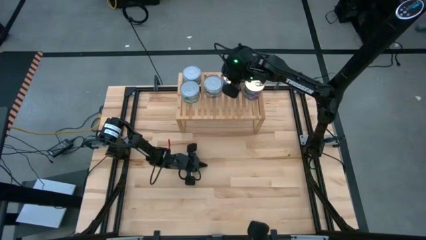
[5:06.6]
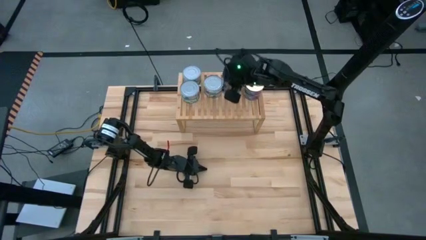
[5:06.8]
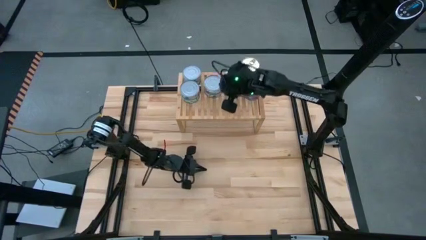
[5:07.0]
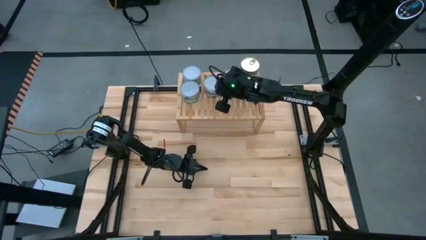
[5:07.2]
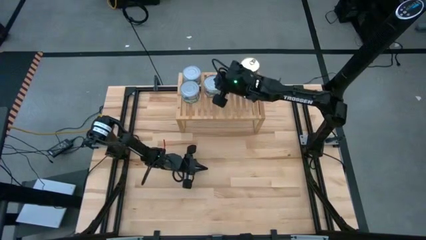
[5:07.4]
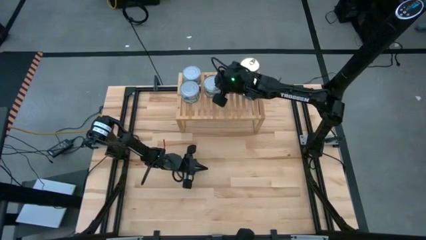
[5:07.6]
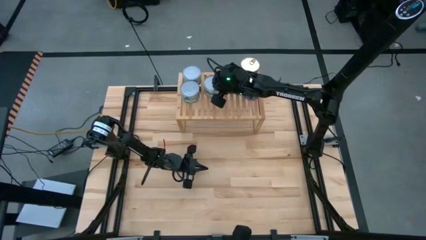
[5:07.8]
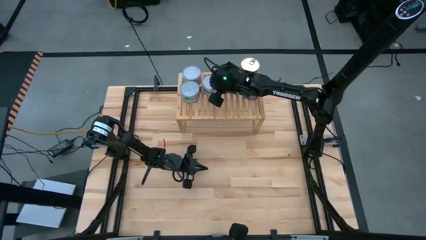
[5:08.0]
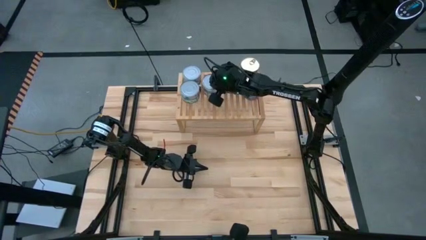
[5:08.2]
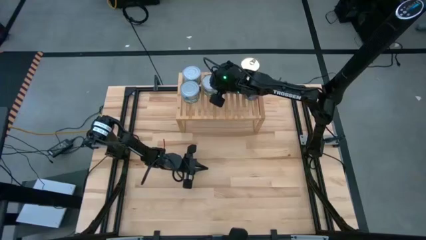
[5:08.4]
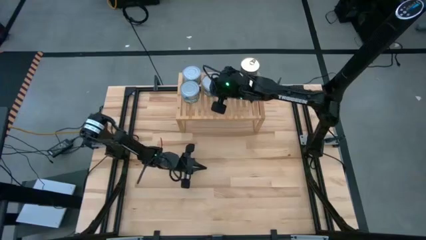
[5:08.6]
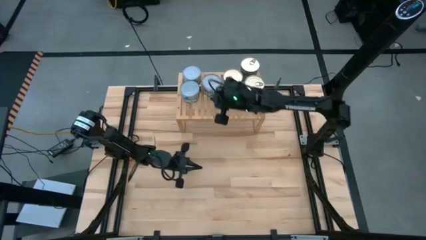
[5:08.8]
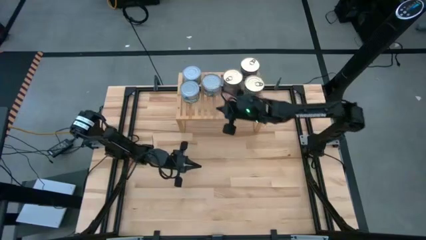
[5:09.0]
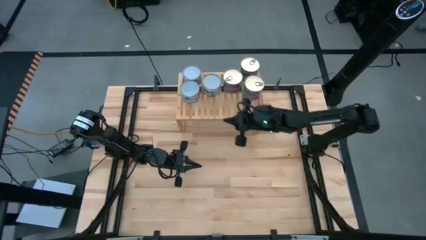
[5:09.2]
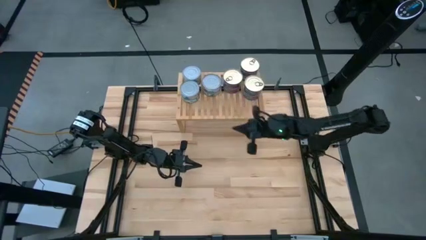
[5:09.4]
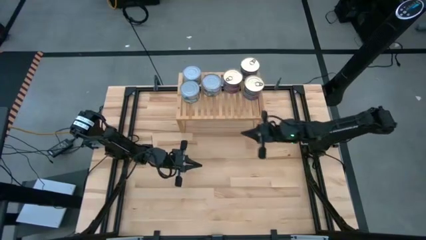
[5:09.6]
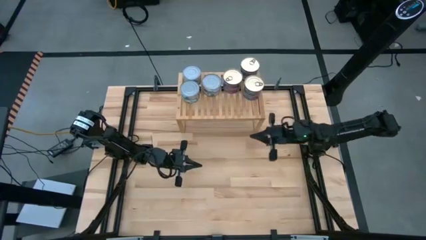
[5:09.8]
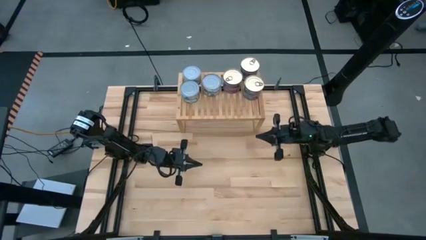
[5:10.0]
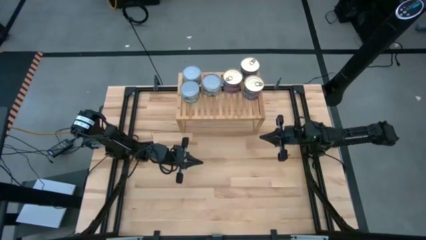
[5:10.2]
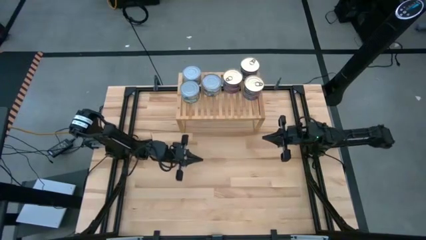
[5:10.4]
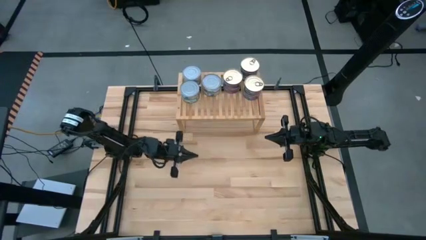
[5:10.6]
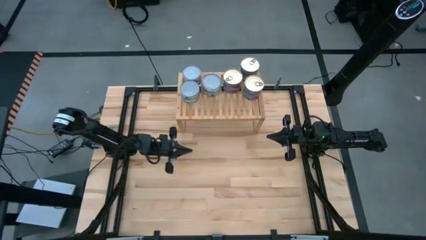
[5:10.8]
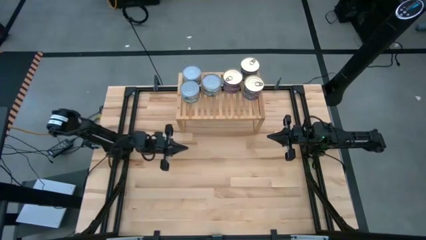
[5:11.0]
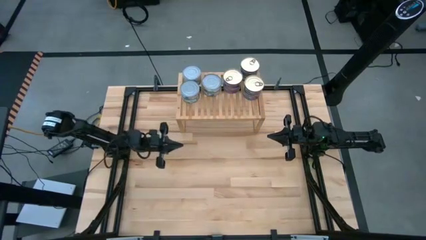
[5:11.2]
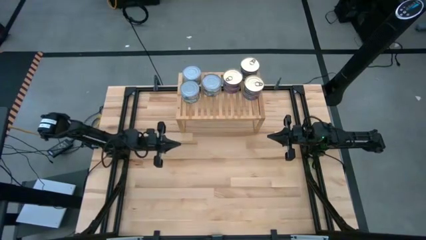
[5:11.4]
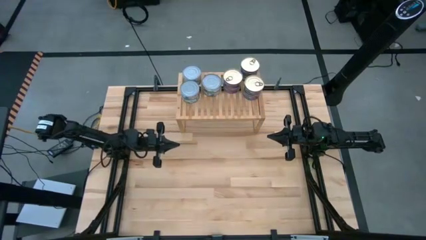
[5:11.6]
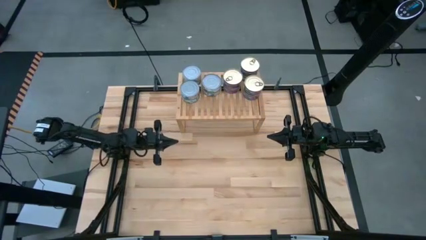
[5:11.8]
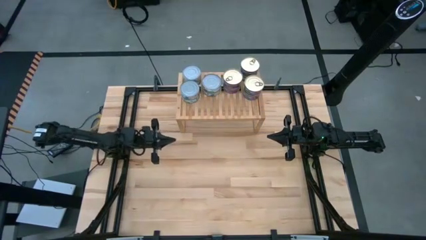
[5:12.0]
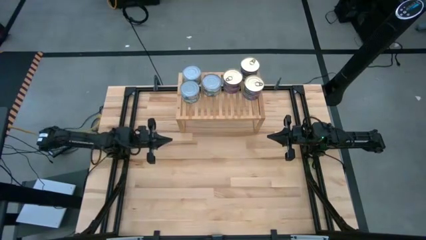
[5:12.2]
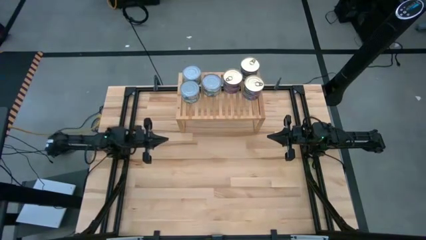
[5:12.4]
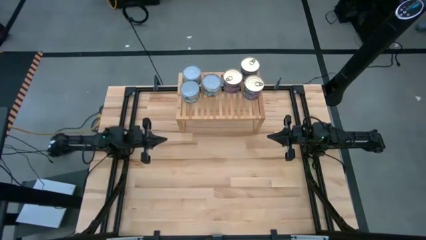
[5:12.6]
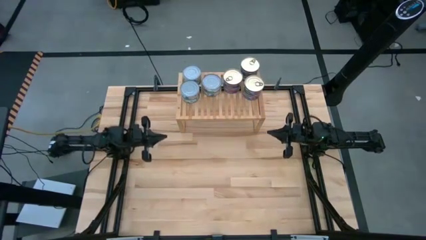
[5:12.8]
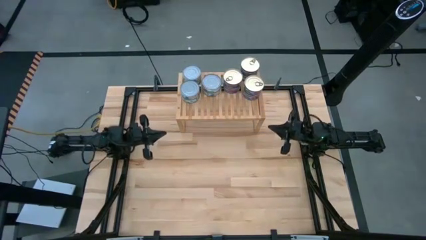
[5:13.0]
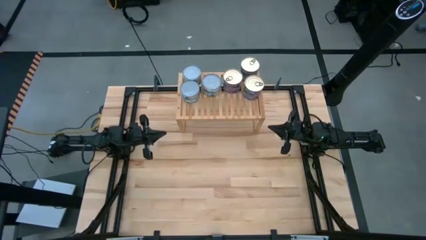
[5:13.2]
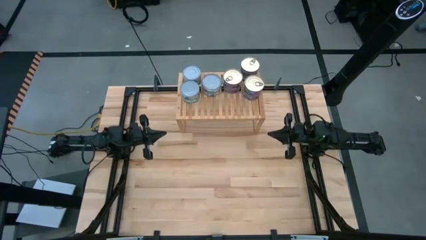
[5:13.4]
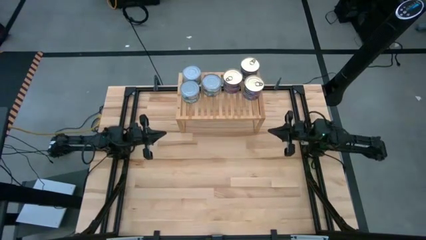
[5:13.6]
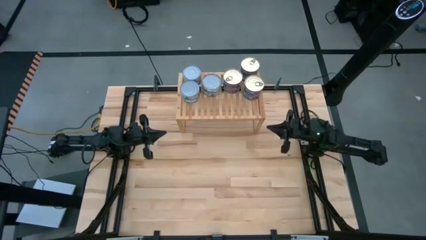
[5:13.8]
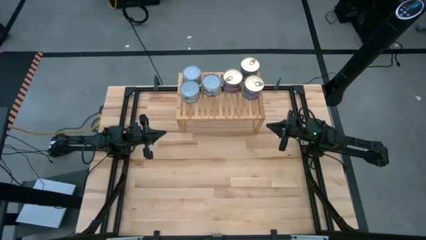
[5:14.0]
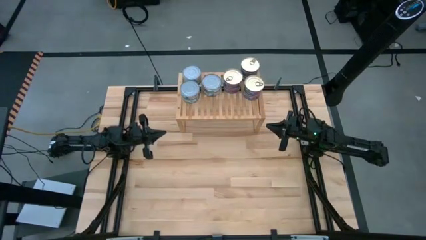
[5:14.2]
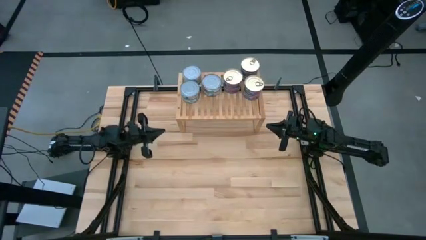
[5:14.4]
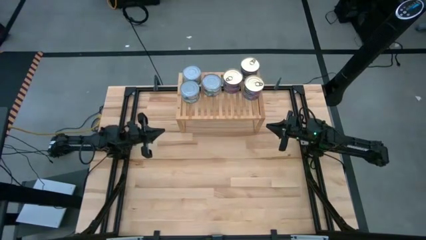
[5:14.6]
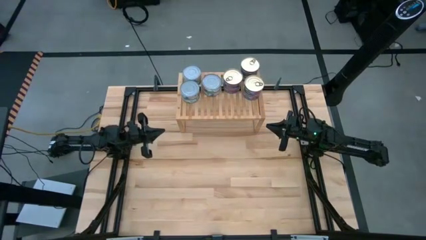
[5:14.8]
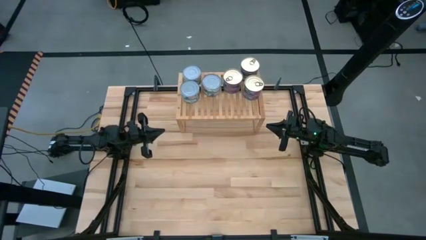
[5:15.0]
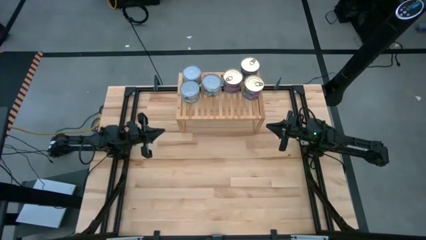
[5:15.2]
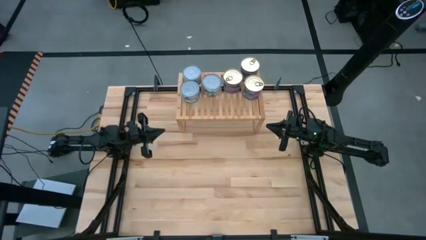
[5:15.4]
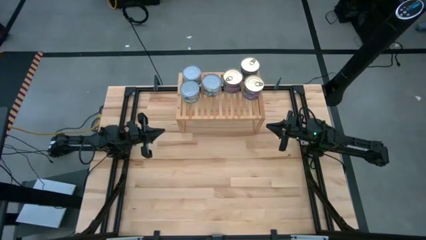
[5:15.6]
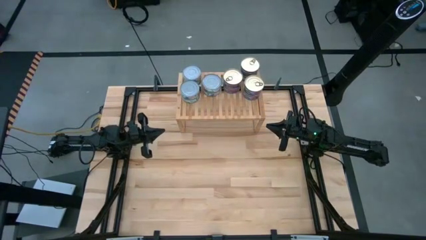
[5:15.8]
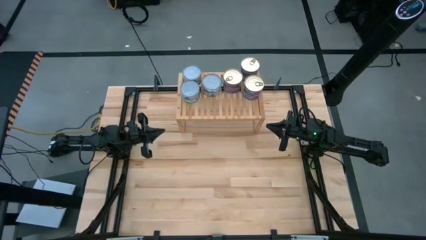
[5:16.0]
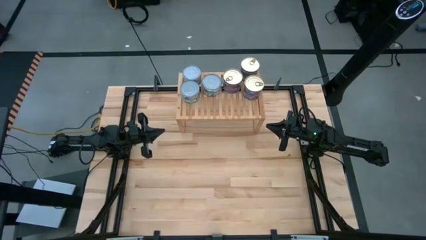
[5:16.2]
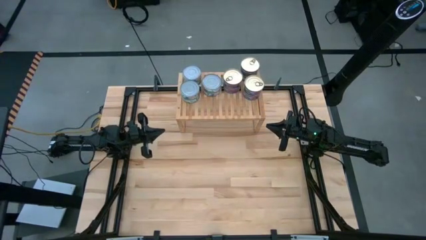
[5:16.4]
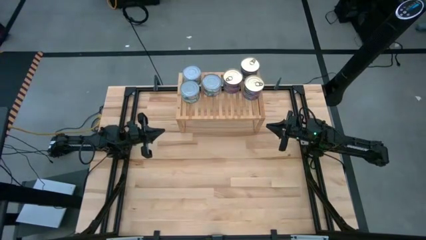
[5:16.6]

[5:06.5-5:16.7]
Task: Stack canned seafood by type on shelf
Return to Home Position

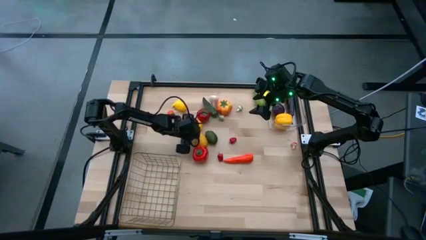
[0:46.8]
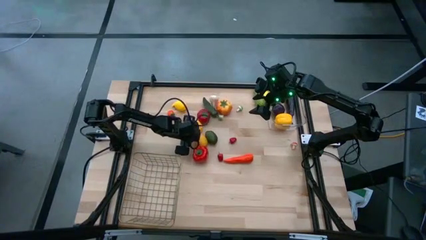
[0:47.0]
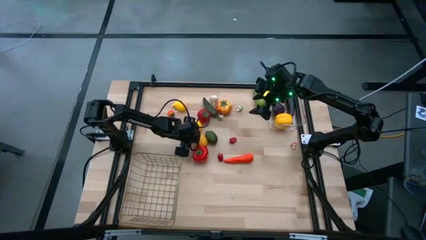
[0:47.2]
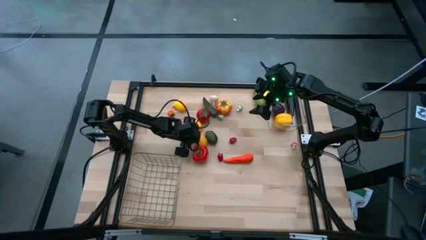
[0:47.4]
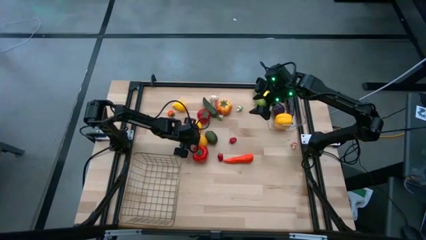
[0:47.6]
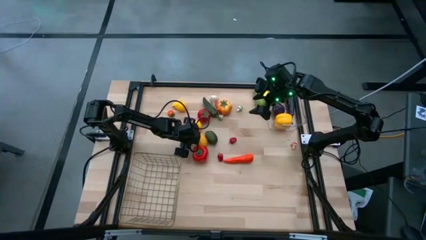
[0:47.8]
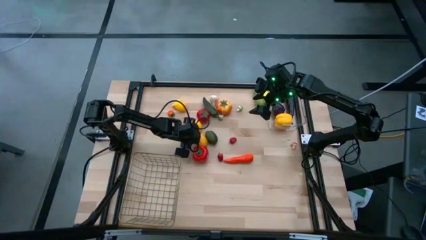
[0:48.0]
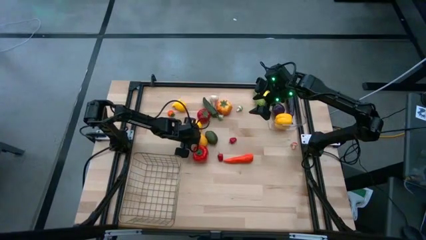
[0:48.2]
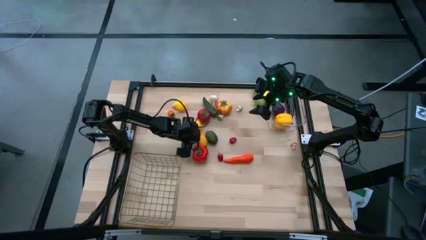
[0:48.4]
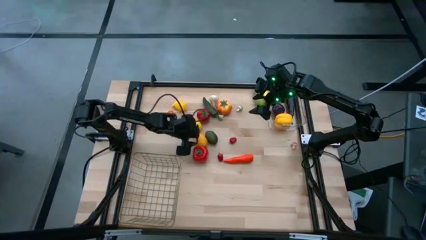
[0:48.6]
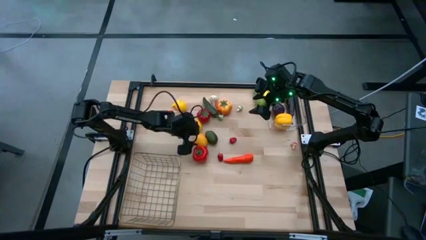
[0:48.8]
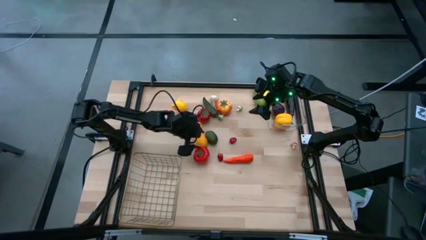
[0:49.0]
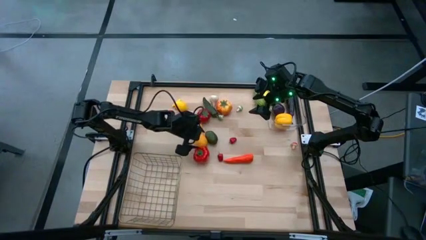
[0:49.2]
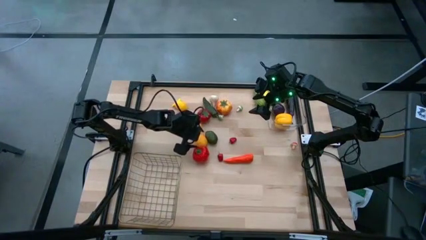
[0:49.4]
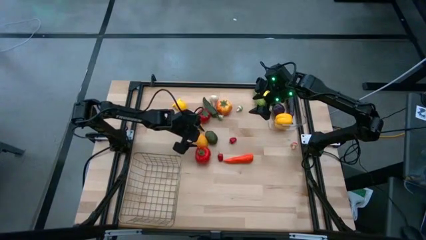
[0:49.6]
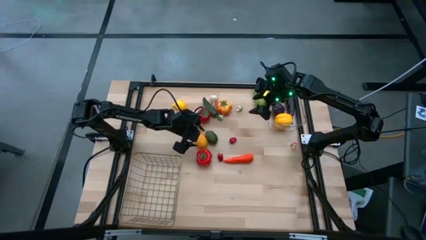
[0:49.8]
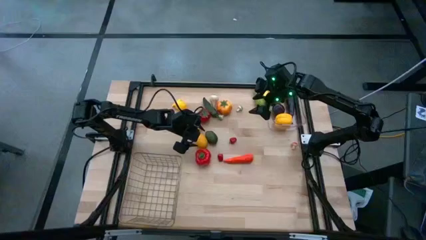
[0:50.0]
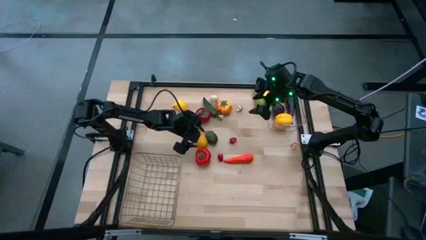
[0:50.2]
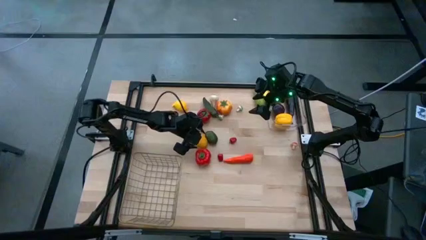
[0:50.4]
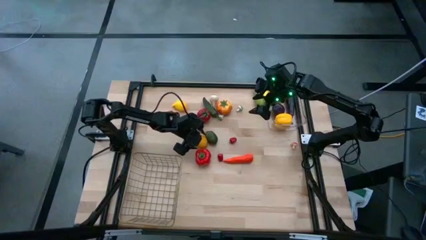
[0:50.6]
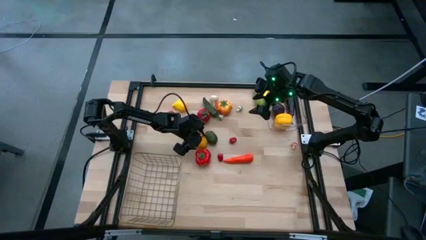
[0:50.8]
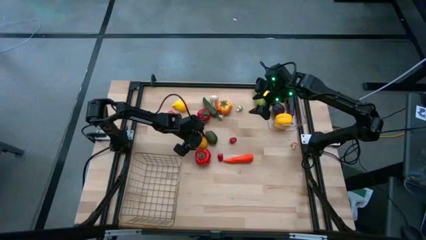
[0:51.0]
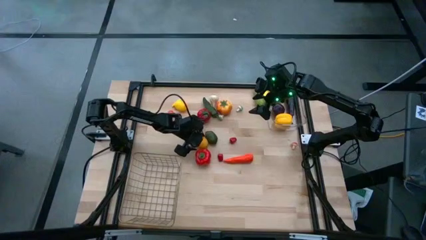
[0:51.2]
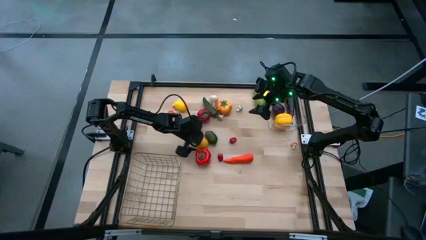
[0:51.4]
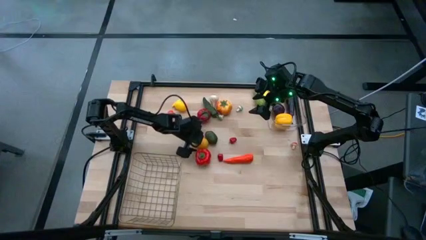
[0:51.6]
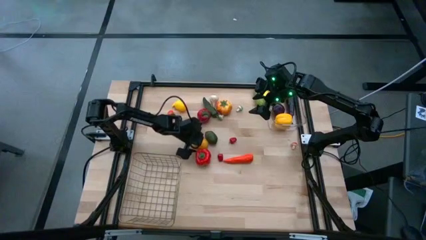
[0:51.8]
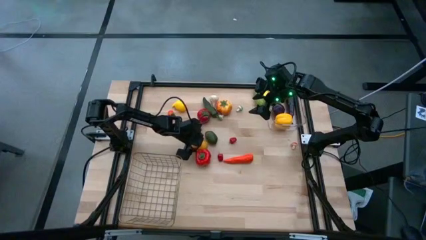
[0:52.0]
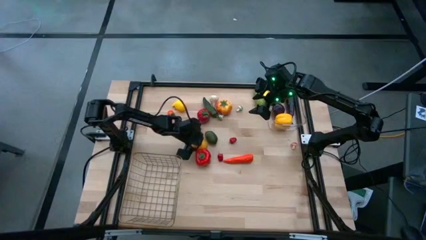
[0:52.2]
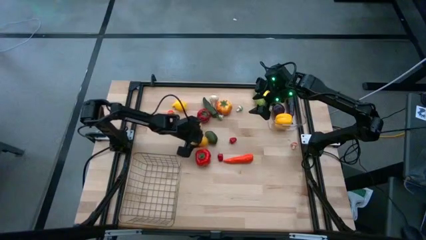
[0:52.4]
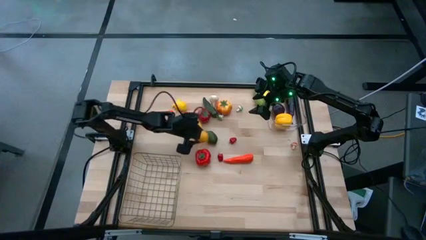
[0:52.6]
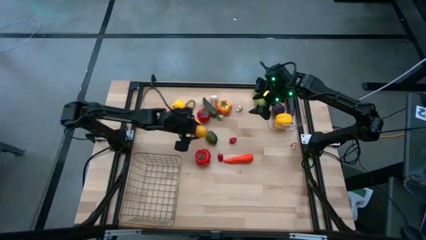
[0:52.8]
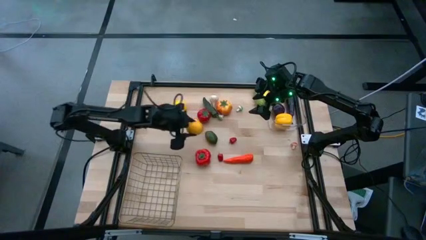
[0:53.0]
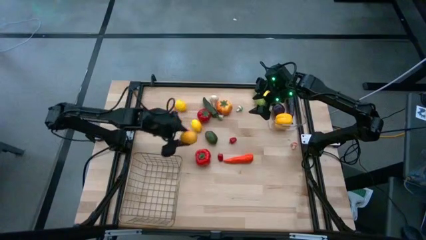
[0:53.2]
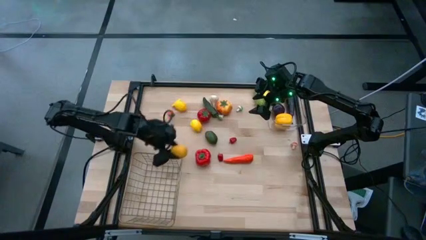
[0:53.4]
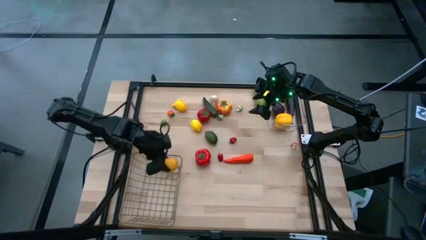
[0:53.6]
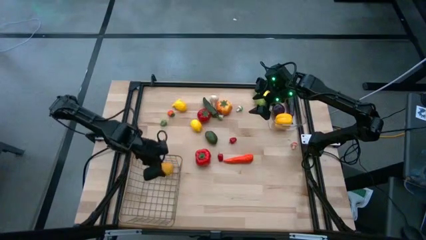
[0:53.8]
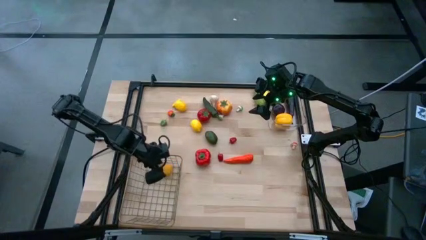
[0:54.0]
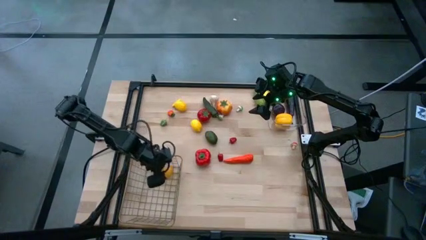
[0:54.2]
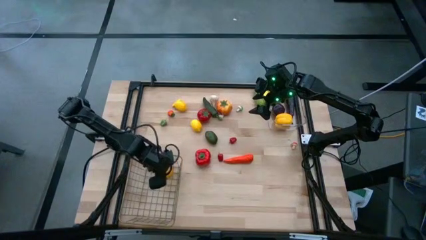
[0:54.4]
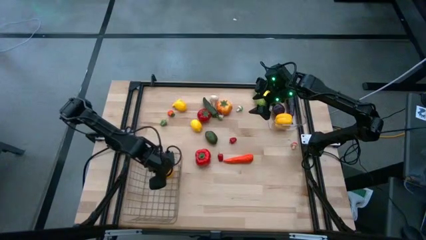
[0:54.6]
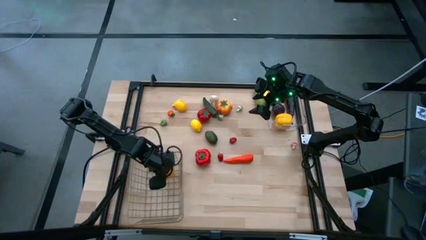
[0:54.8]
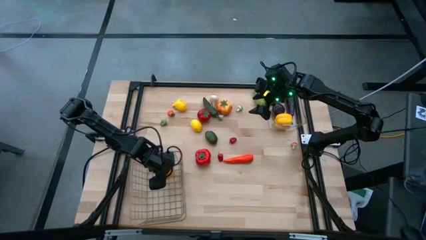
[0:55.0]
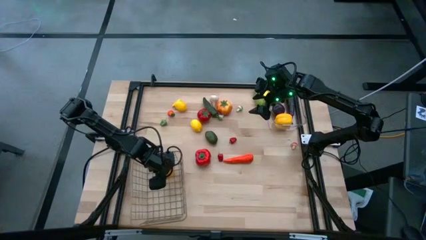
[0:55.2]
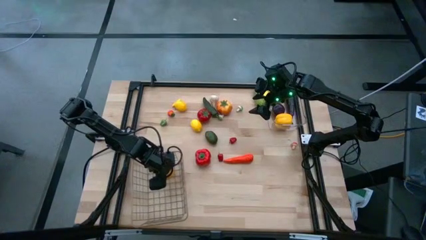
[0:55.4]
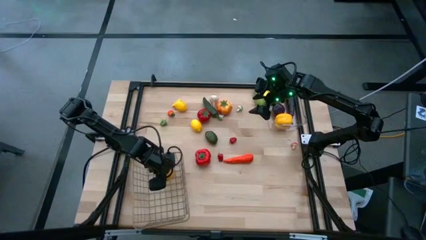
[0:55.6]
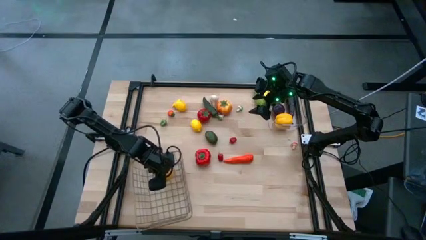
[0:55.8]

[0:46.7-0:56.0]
Task: Sort produce into baskets
Put the bottom lemon into the wire basket
